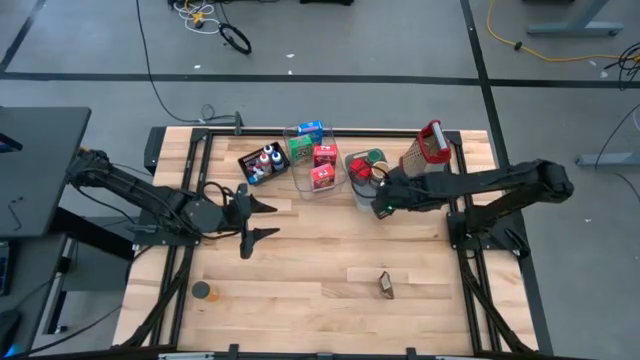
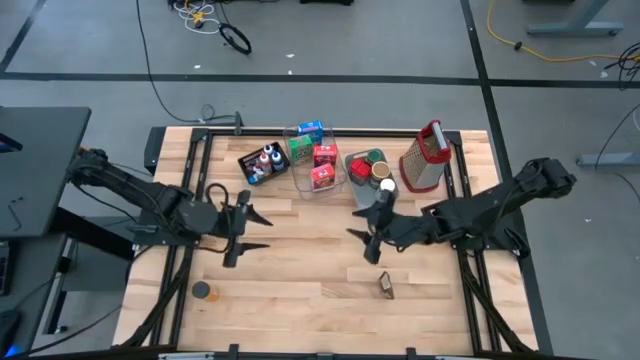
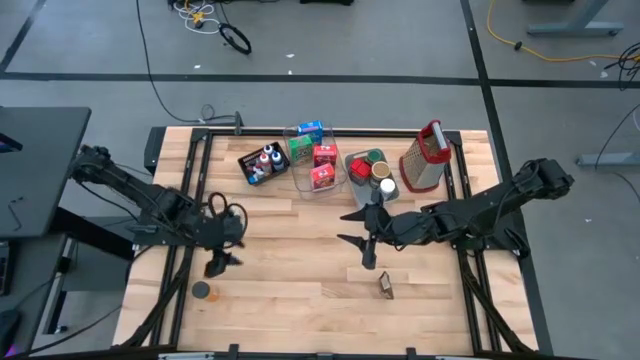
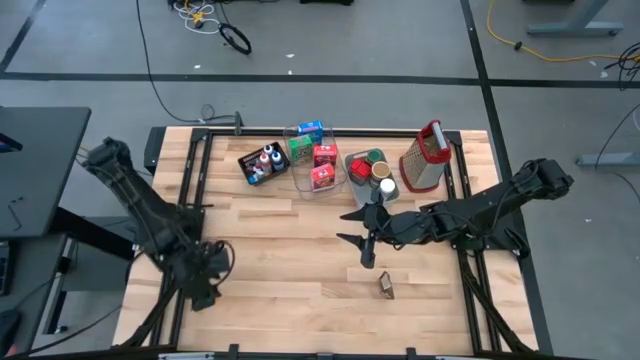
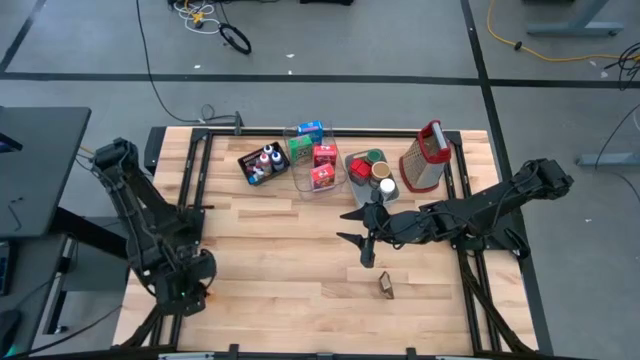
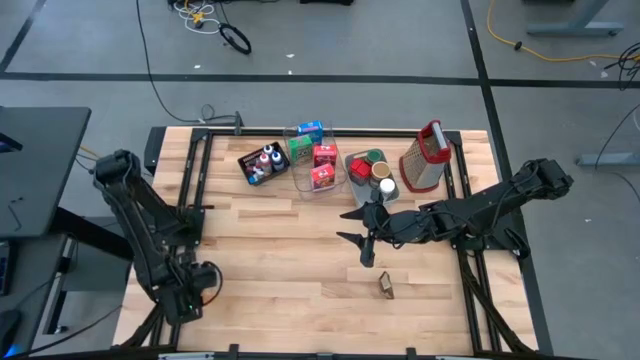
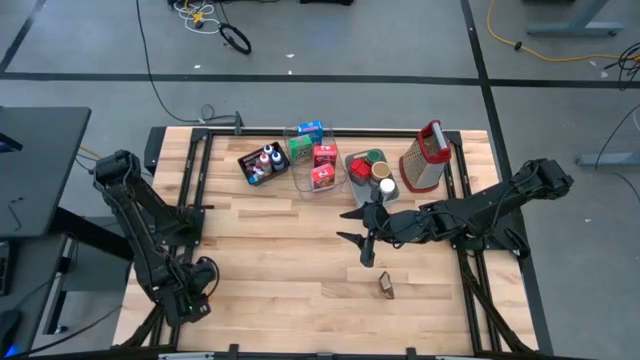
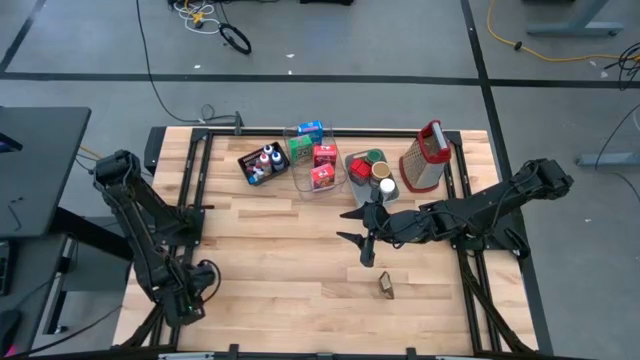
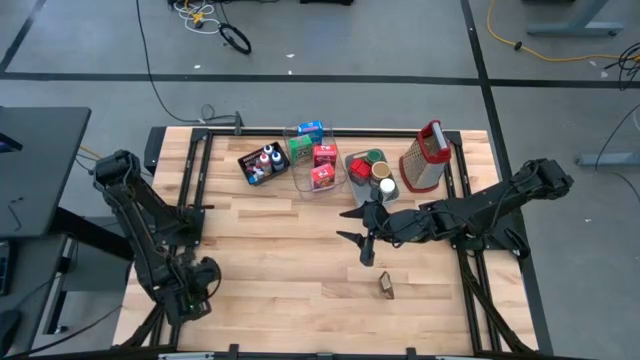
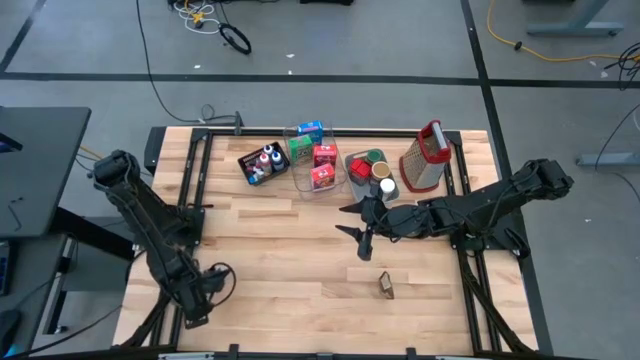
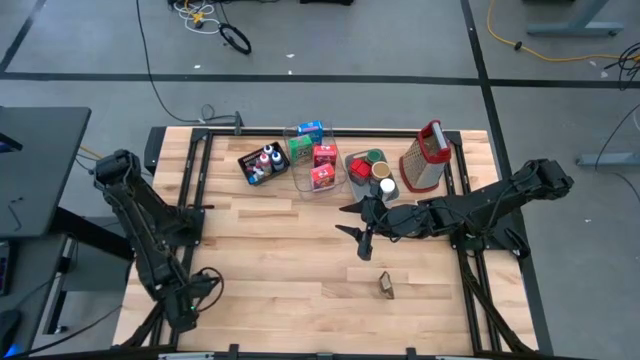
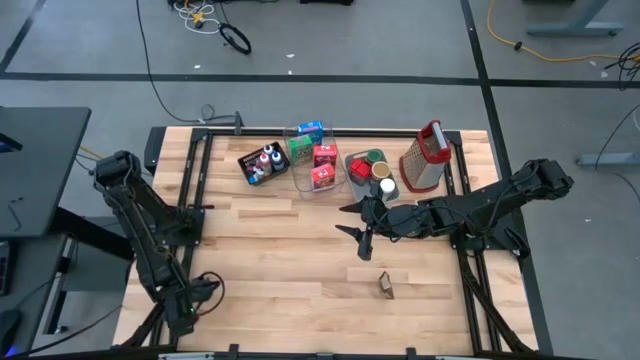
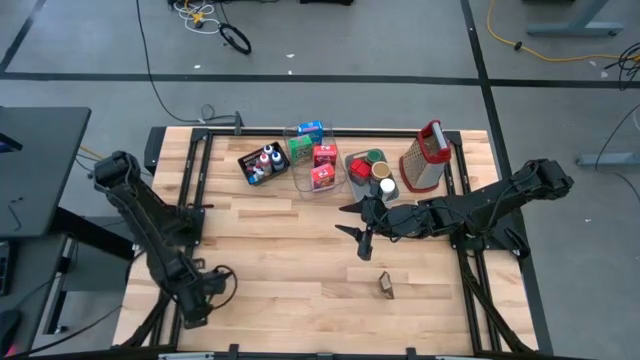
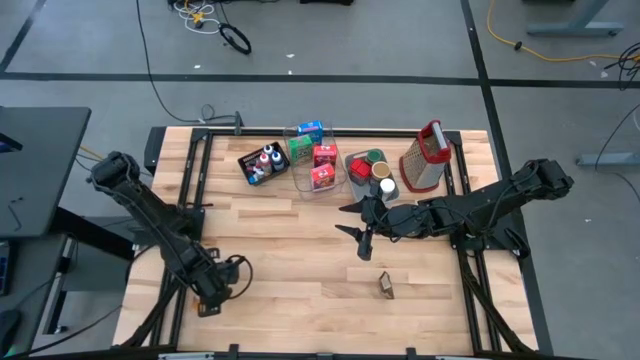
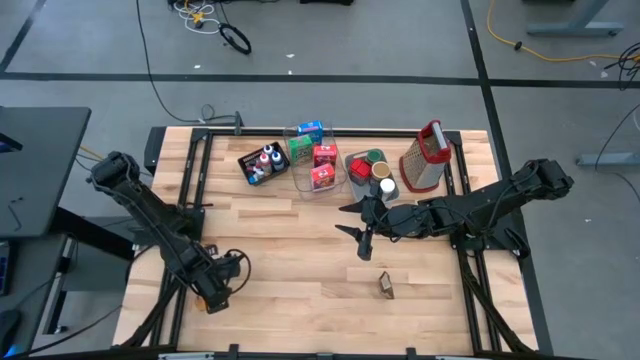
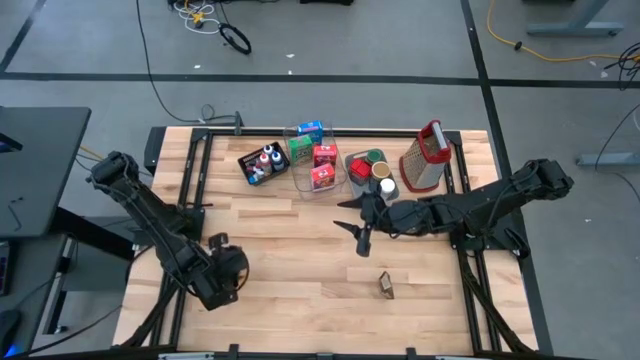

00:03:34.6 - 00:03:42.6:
Task: Pick & Place Kitchen Items
Put the black spice bottle into the gray bin

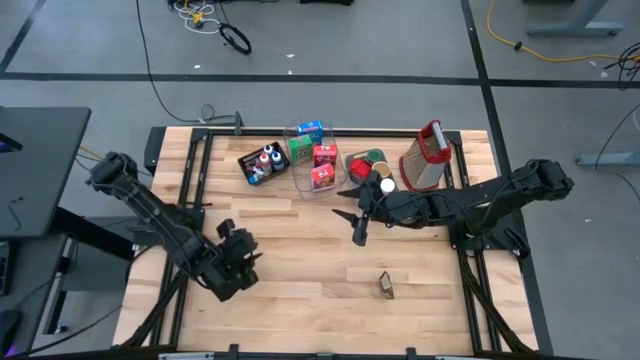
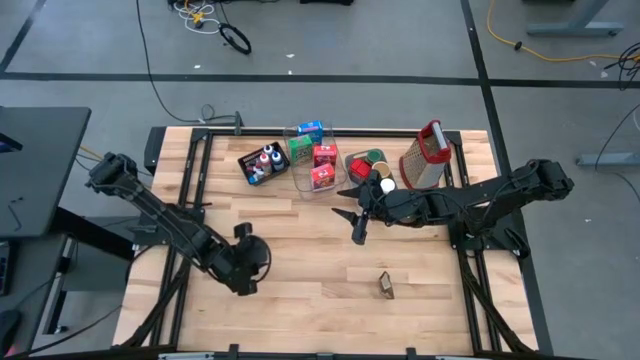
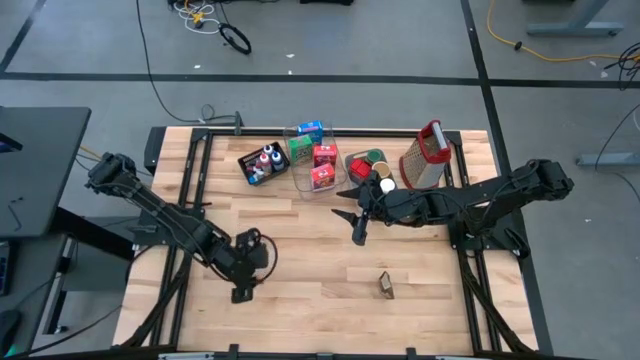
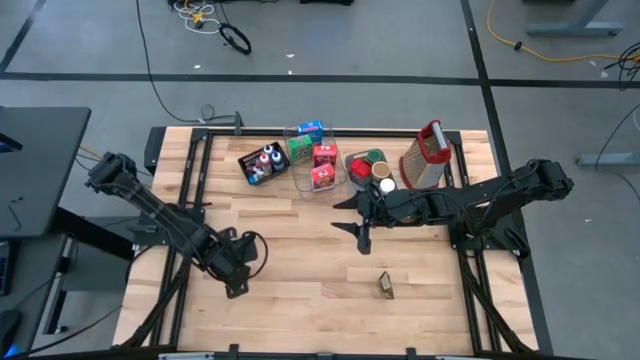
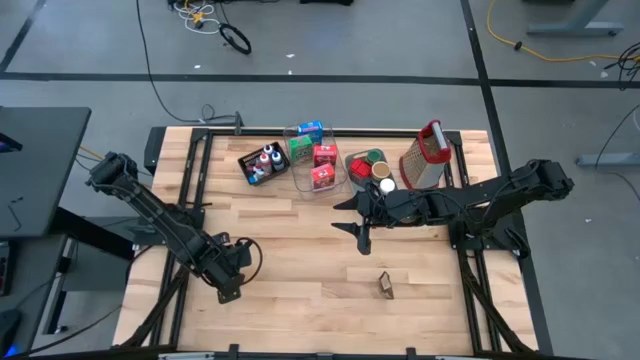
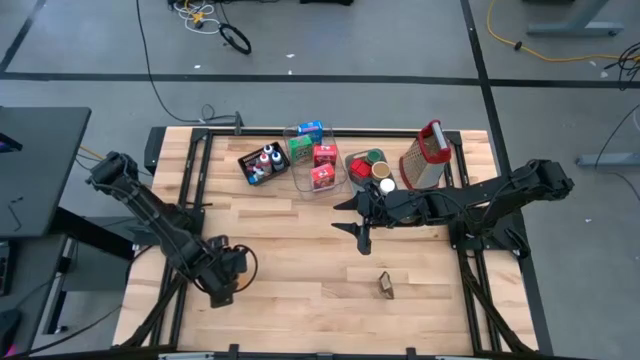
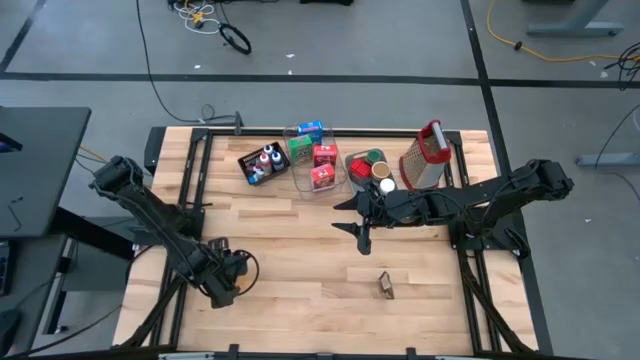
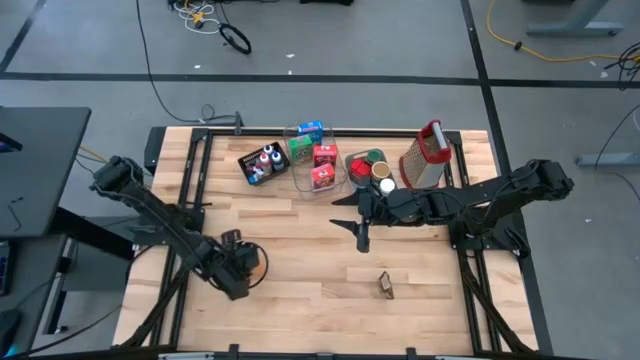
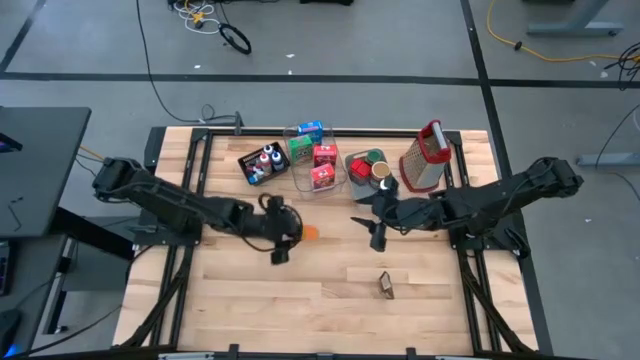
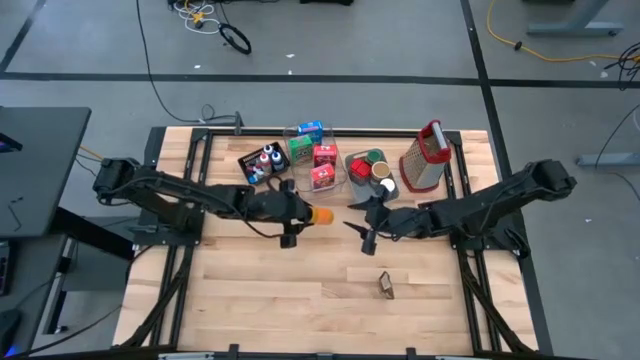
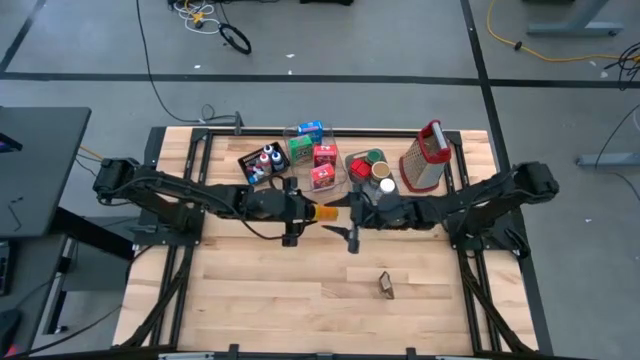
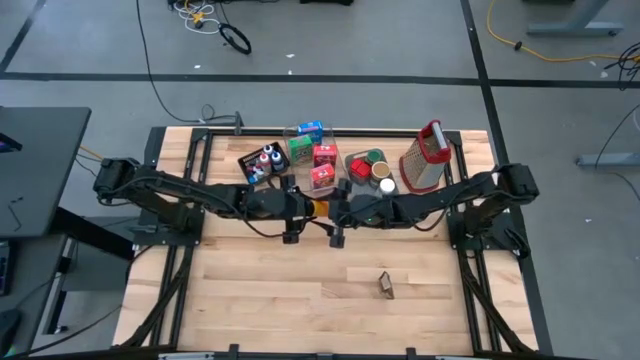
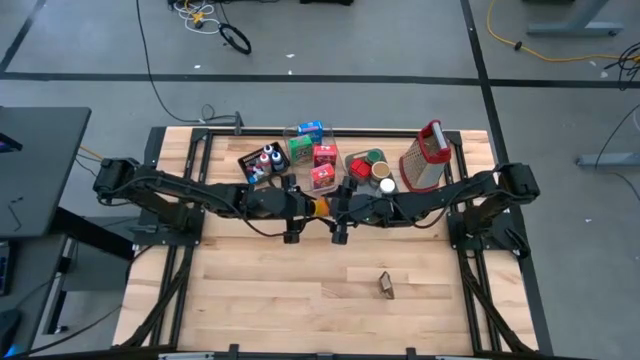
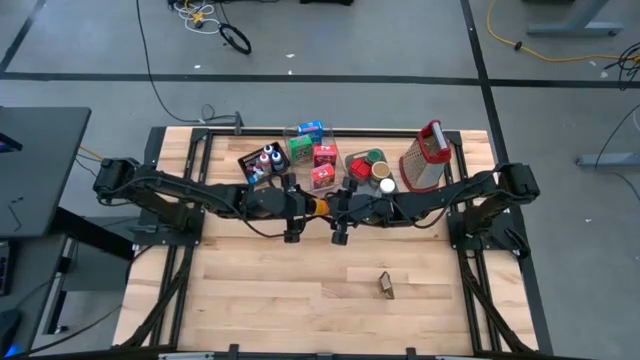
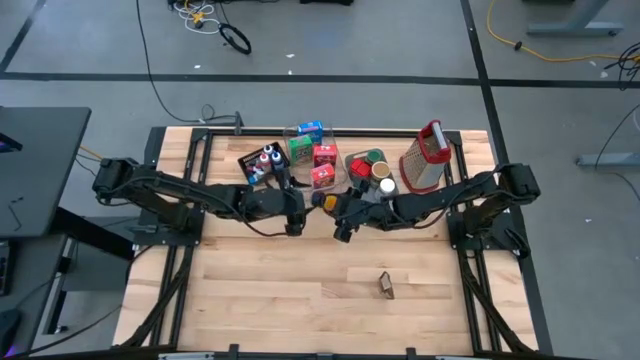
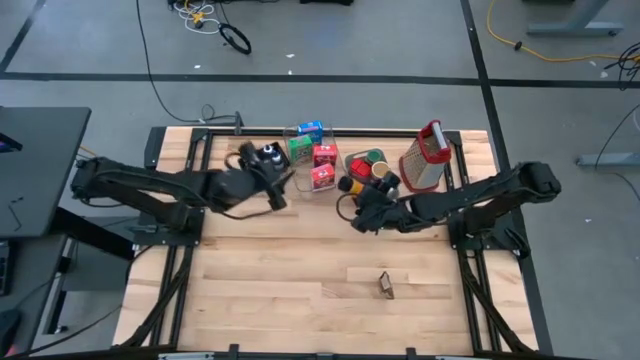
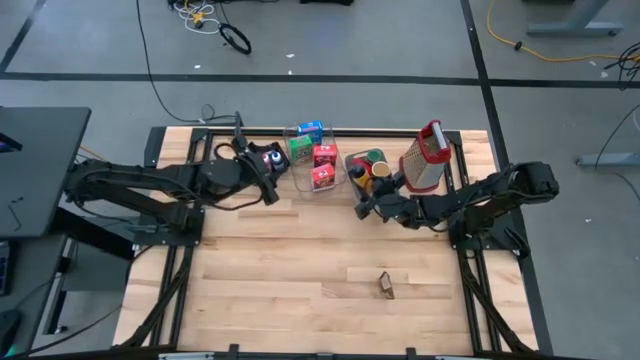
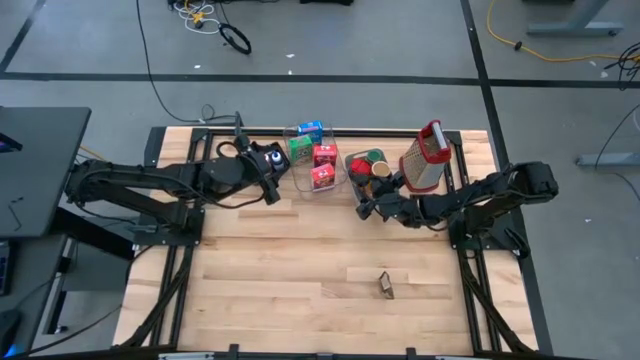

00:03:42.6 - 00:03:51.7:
Put the black spice bottle into the gray bin

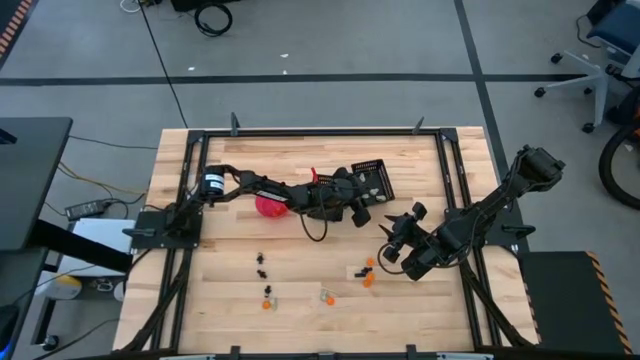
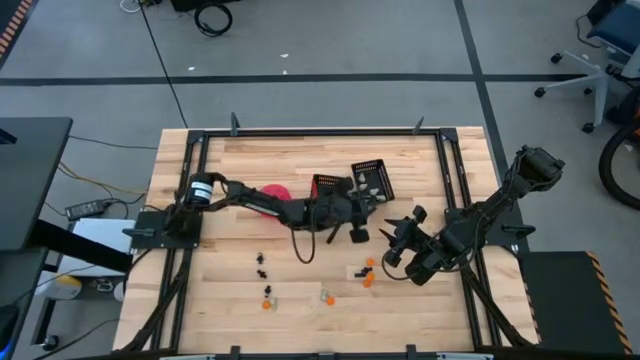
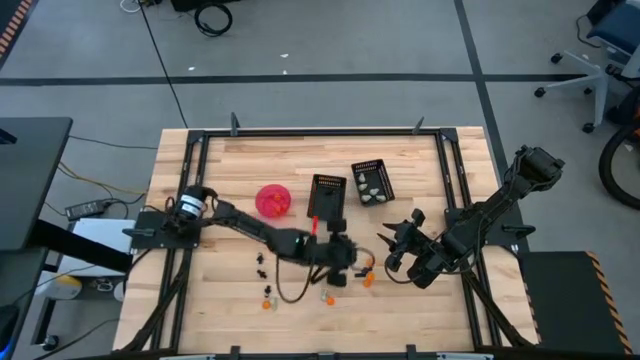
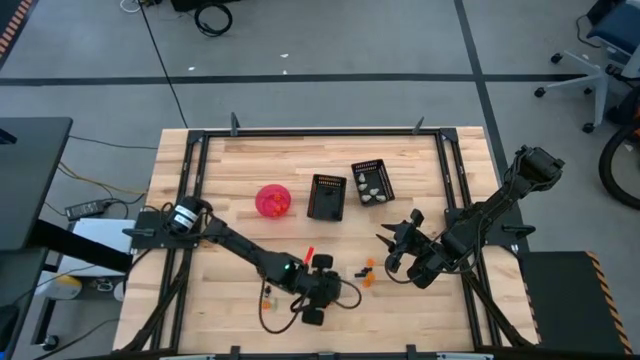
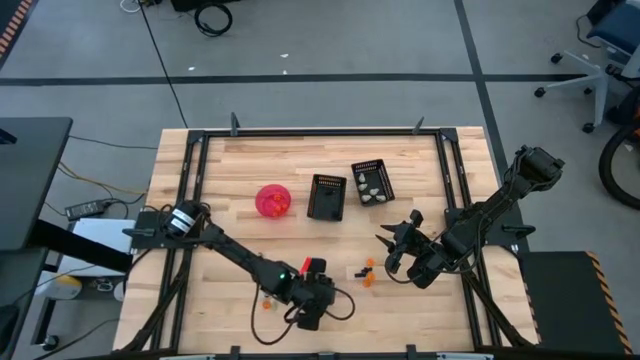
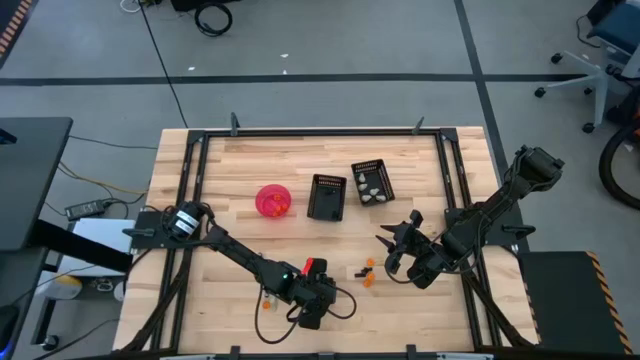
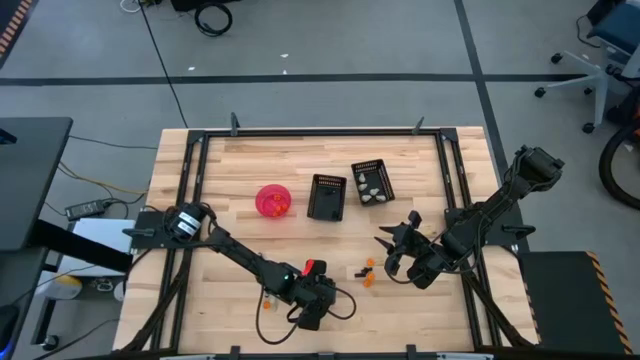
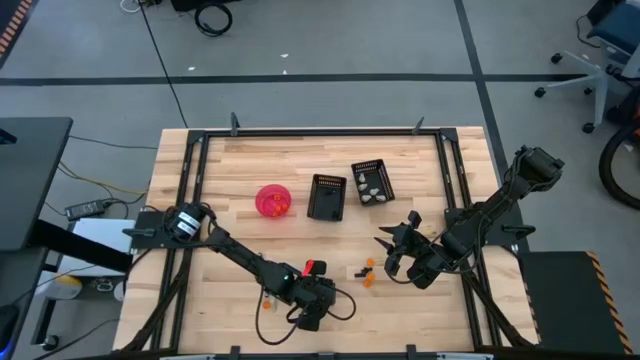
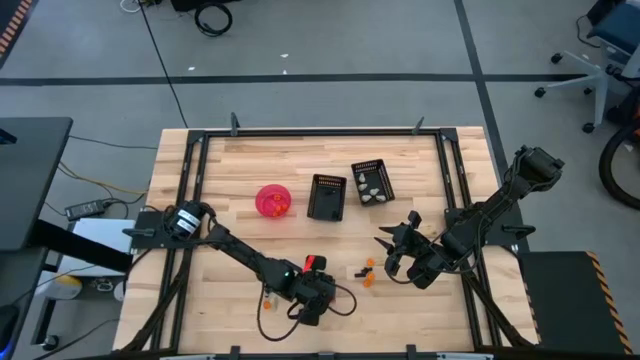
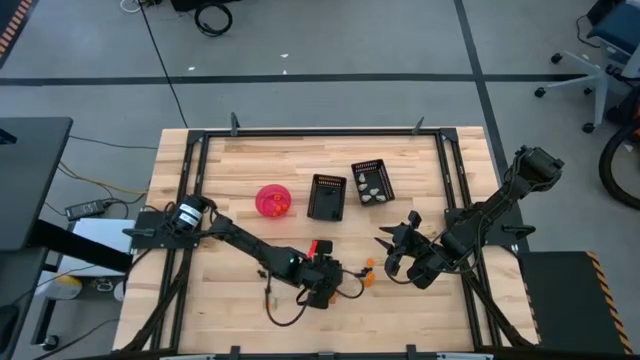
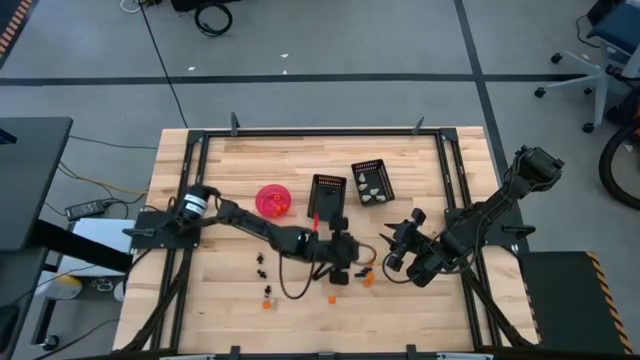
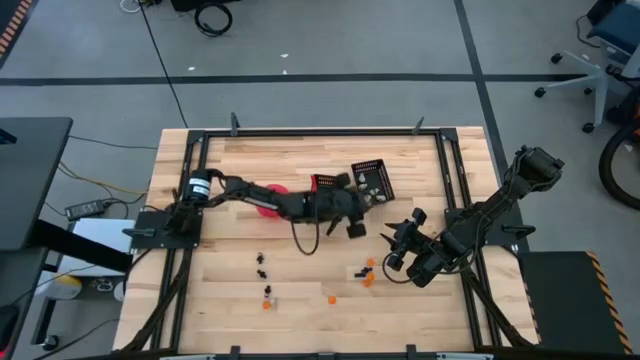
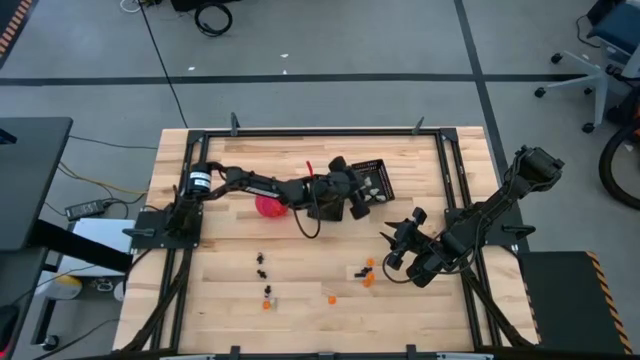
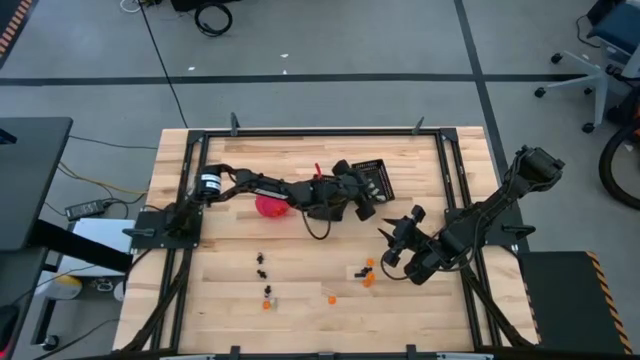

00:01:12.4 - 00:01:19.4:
Task: Sort Halloween decoration
Put the white skull toy into the right black bin
